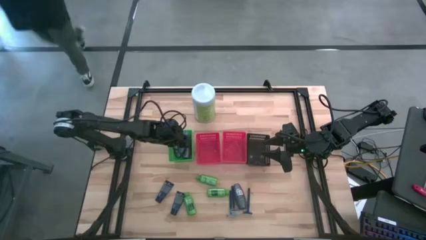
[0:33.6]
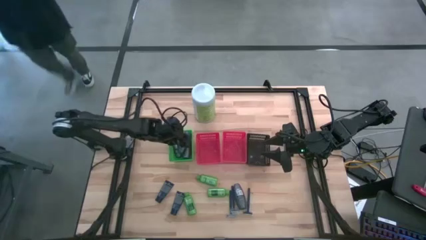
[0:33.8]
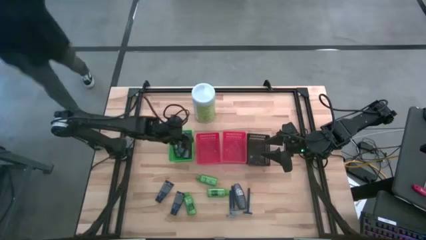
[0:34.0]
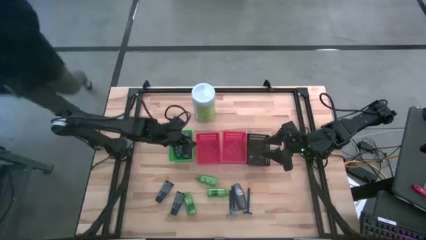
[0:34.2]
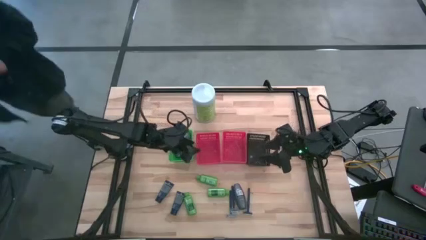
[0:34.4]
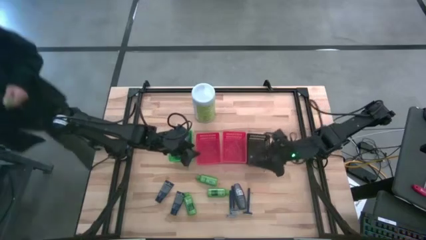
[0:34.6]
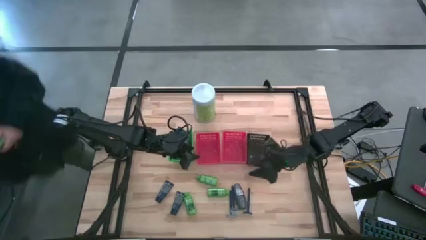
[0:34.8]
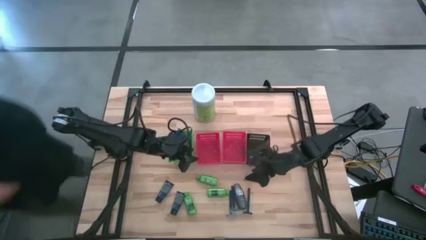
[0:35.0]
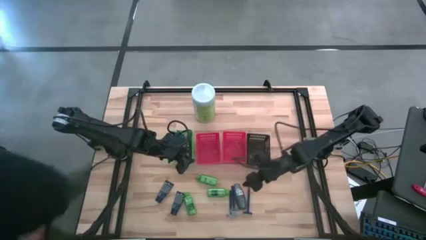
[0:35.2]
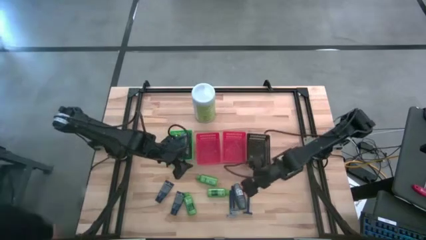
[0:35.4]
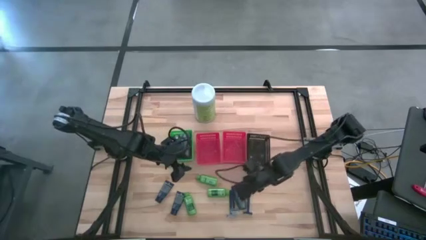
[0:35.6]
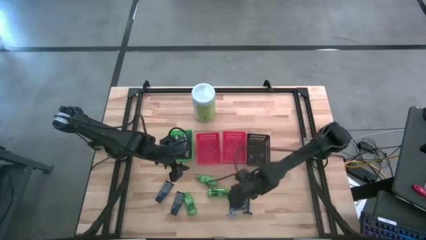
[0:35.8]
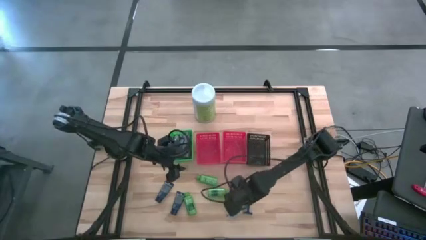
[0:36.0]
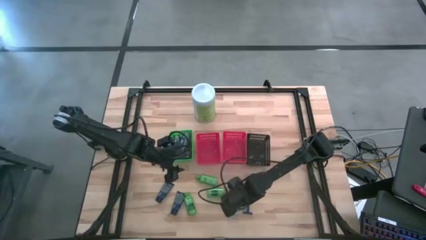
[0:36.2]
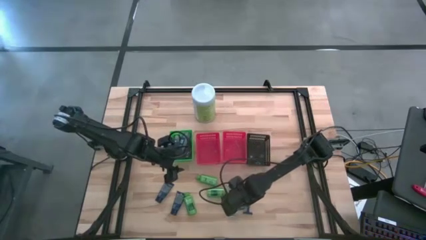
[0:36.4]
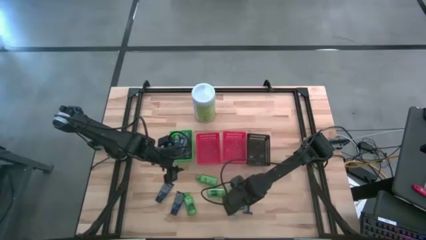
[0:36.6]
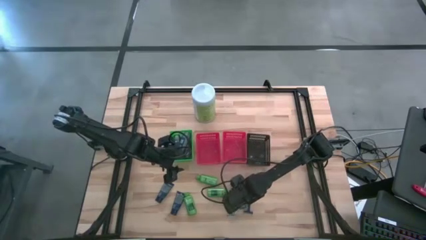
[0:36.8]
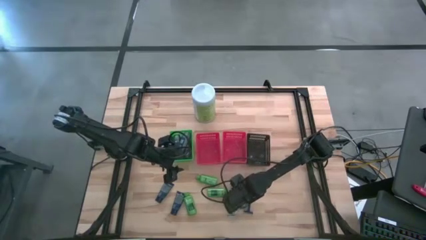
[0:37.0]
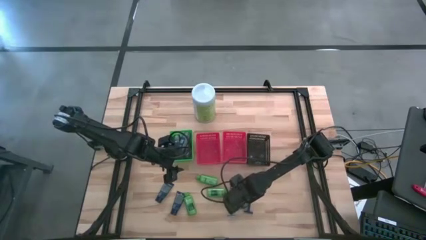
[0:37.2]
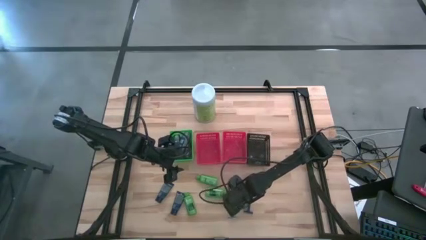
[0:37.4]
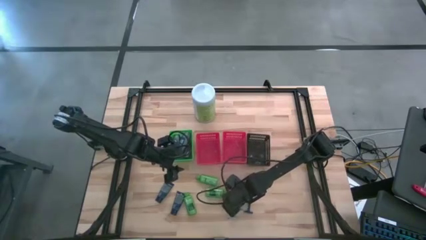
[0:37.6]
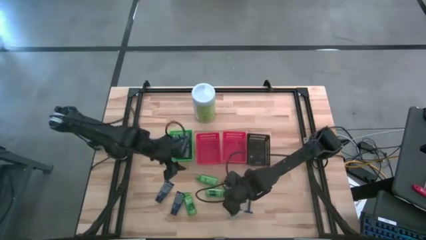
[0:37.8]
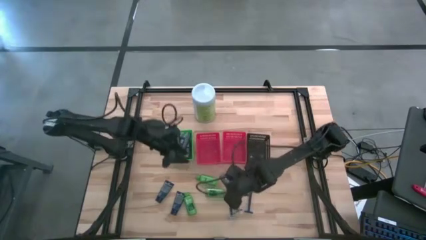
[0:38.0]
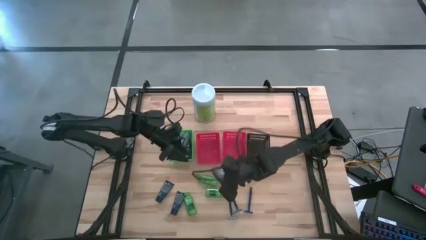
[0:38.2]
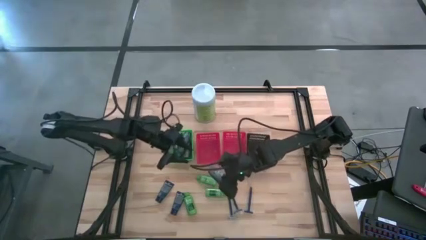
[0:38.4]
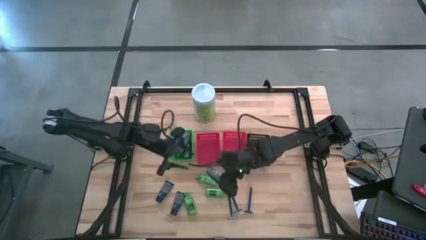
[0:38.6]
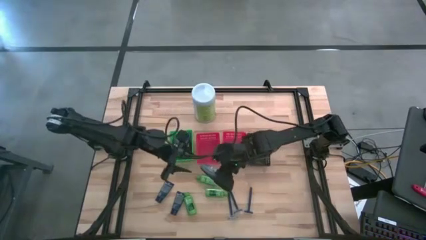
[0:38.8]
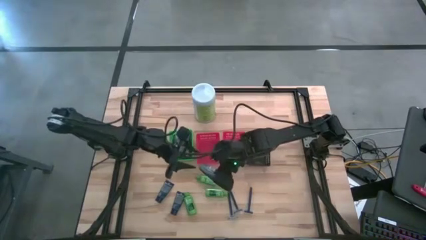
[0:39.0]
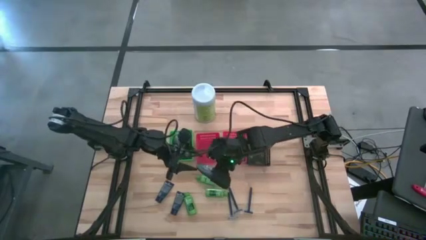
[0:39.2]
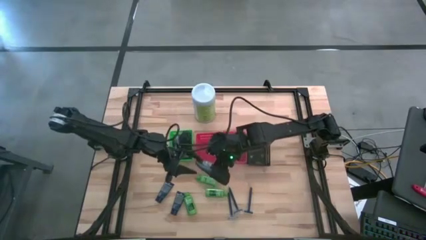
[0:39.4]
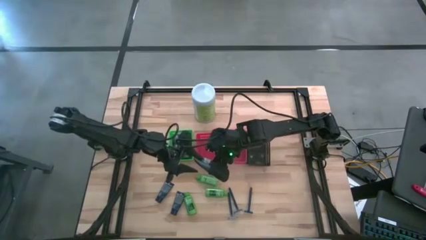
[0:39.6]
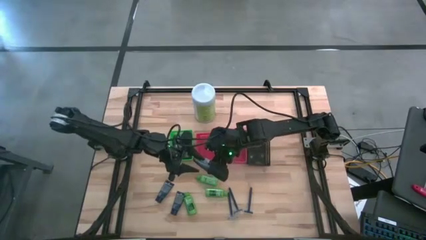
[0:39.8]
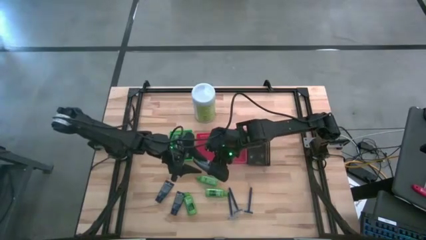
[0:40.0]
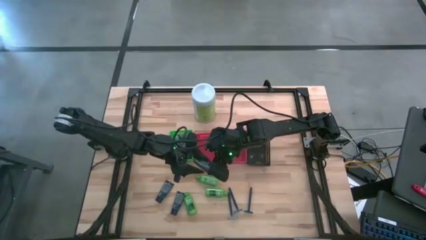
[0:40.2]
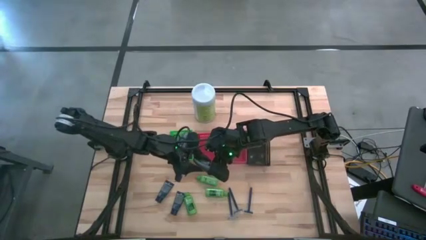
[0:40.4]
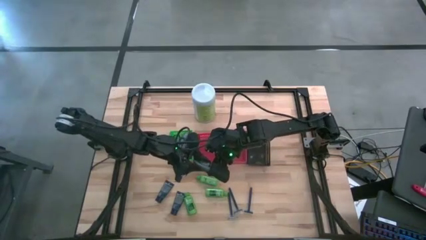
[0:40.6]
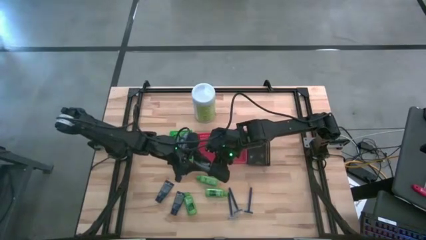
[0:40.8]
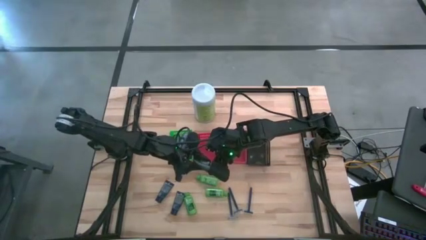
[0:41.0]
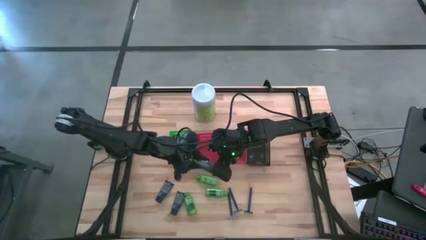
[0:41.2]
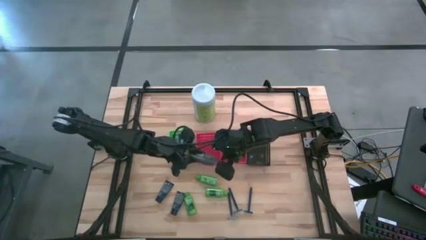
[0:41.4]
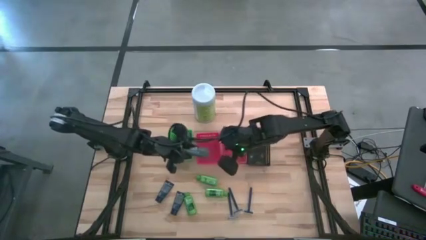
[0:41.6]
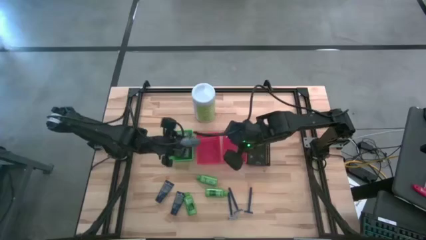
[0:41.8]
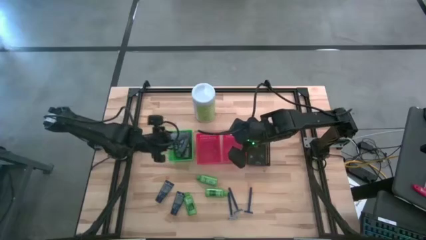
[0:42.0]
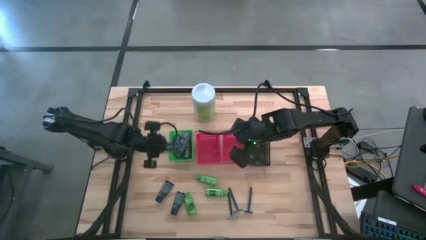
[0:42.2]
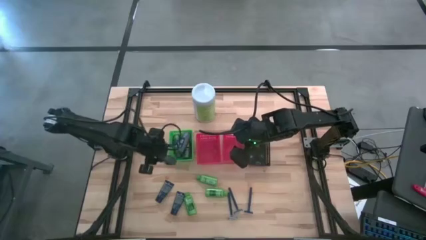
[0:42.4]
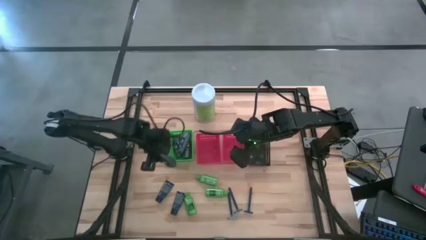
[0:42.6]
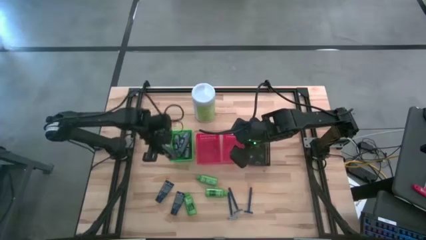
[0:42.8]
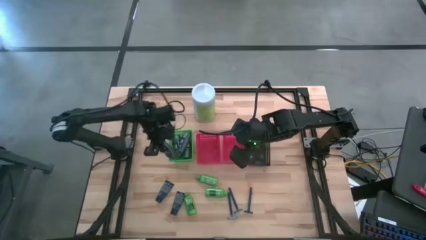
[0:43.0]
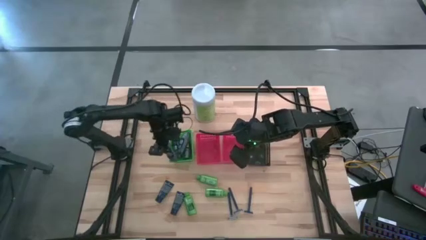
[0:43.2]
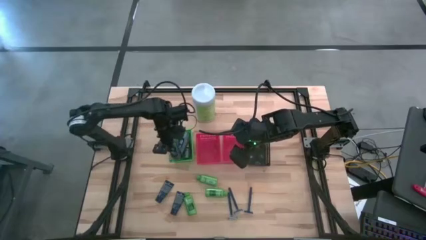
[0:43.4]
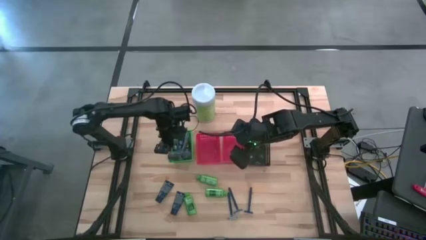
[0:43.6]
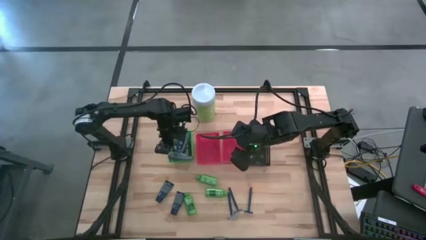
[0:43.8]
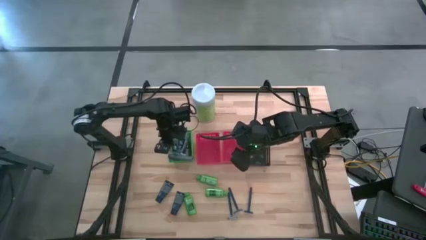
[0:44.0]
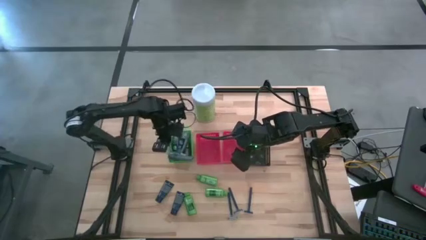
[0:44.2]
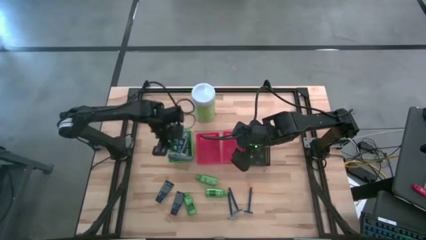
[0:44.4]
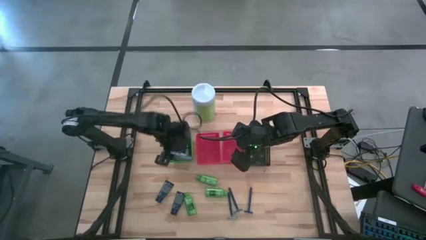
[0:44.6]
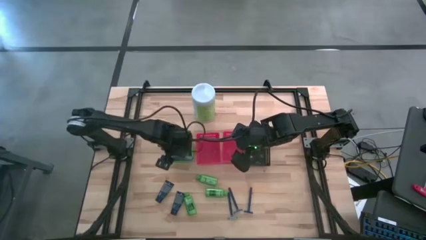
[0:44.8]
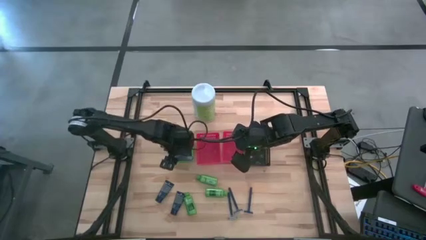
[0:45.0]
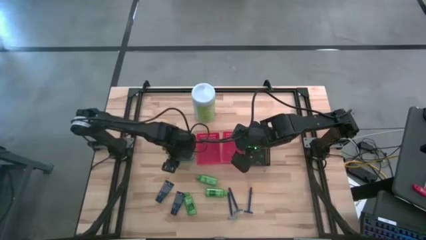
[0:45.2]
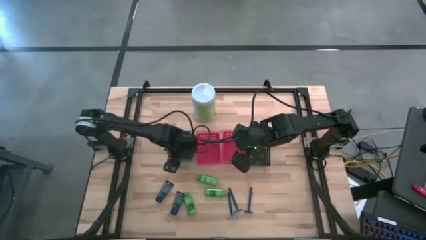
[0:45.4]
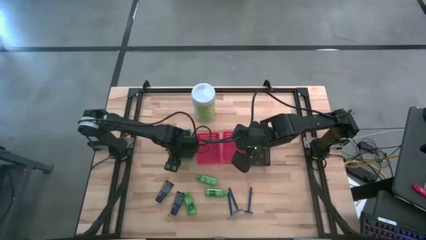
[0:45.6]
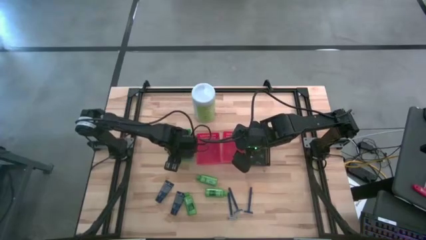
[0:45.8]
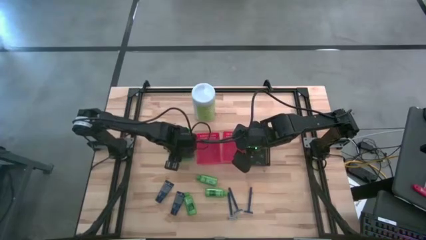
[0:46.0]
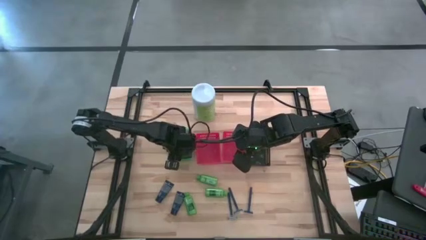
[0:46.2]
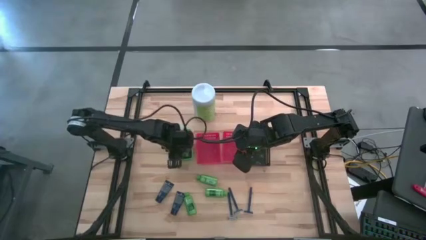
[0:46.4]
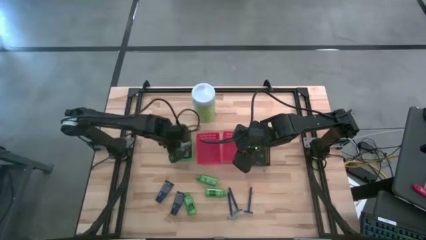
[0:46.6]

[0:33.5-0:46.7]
Task: Pick & Place Travel size toiletries
Put the black deodorant into the green bin

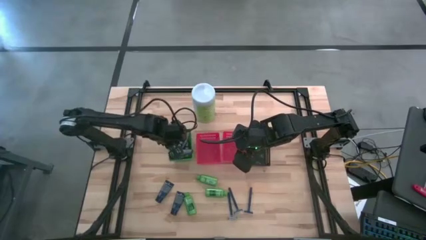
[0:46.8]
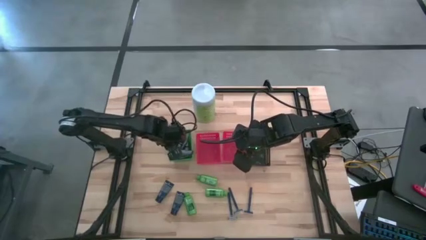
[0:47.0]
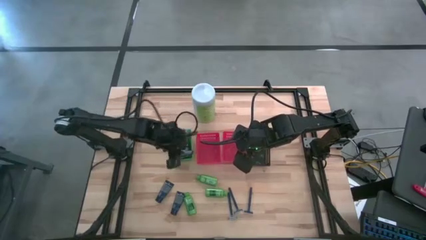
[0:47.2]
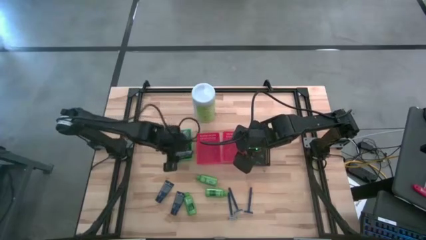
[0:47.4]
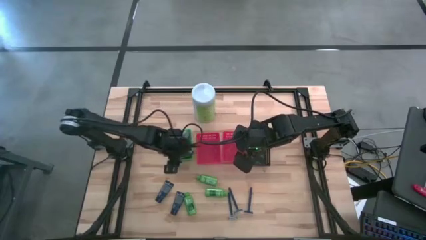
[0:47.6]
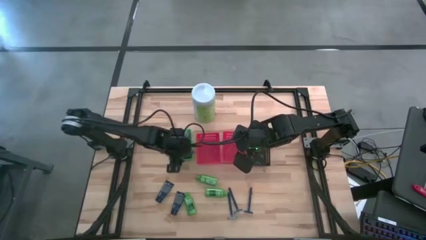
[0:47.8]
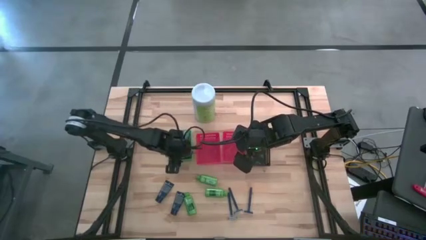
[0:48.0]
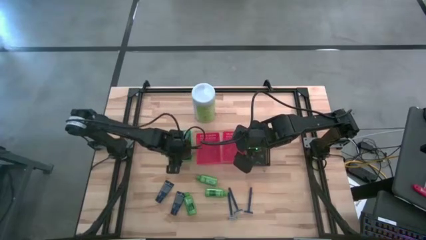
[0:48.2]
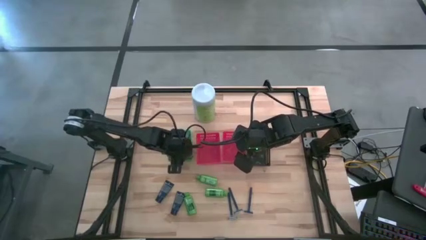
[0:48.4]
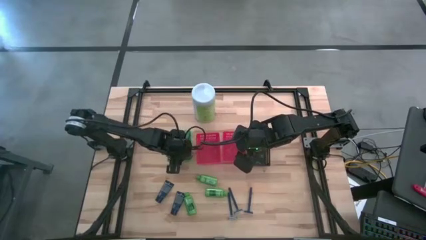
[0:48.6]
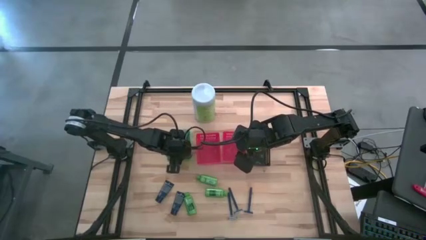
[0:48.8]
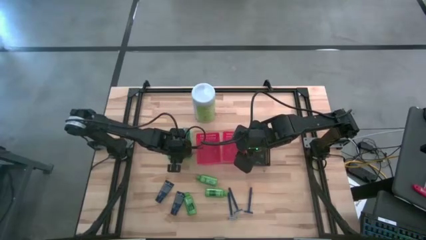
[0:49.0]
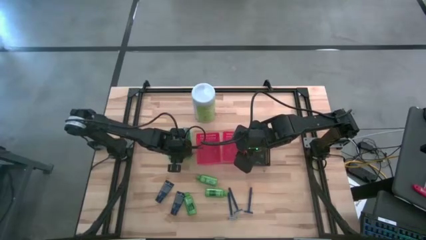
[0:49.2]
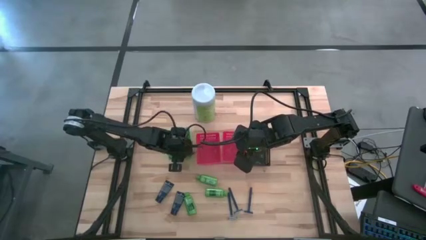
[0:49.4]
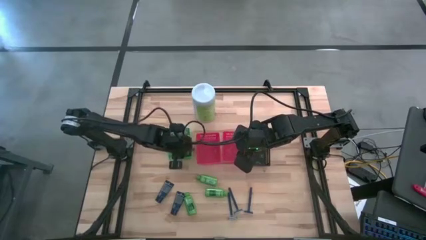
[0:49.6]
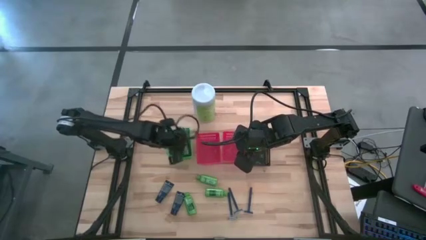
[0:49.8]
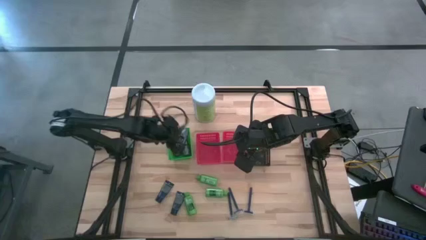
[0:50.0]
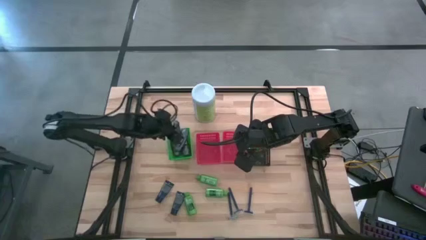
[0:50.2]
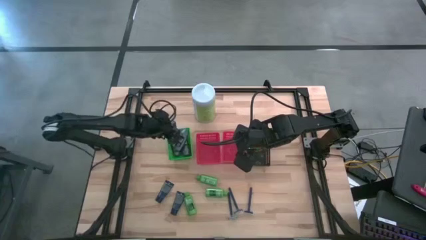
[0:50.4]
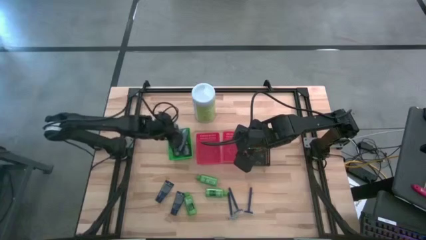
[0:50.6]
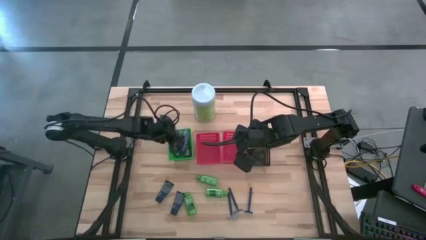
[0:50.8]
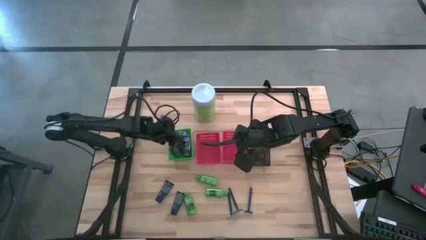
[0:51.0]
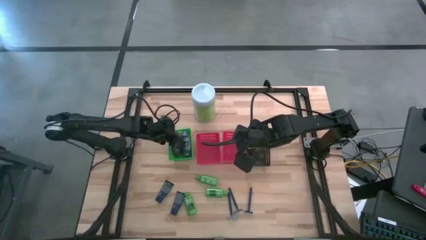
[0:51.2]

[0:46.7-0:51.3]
Put the deodorant into the green bin
